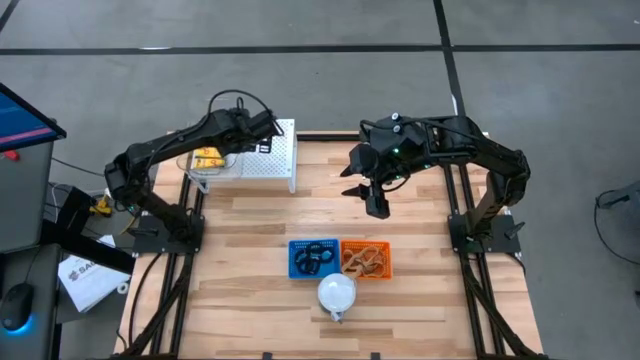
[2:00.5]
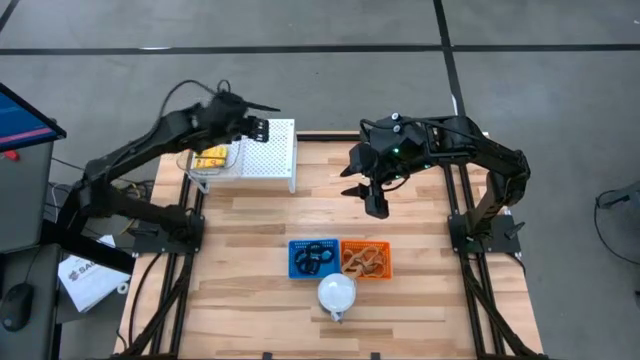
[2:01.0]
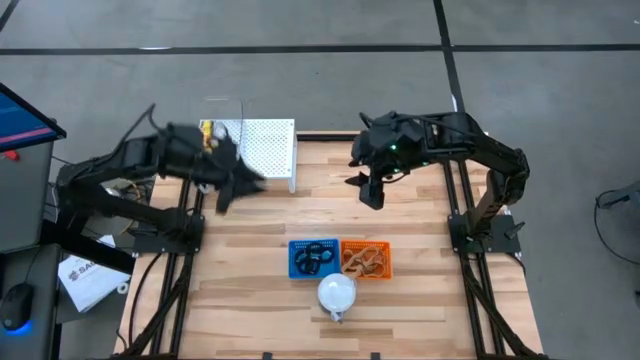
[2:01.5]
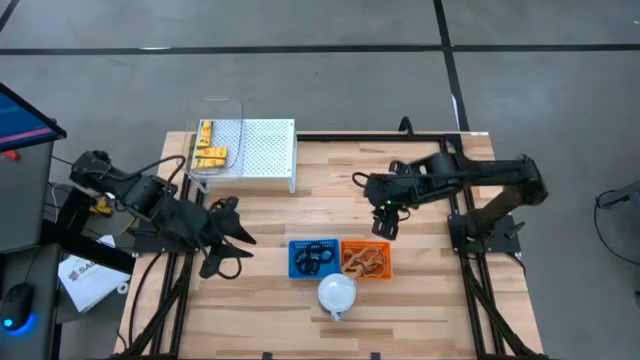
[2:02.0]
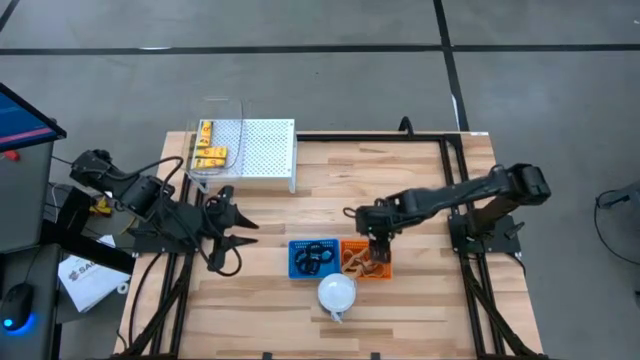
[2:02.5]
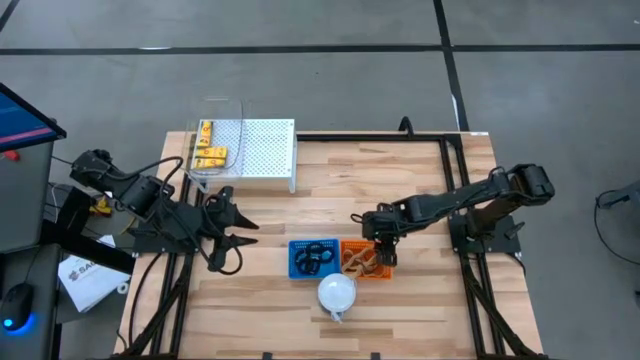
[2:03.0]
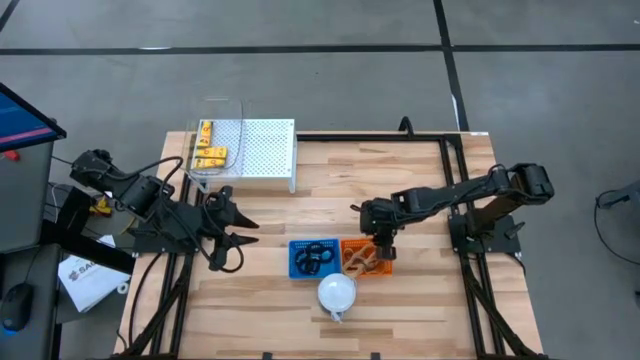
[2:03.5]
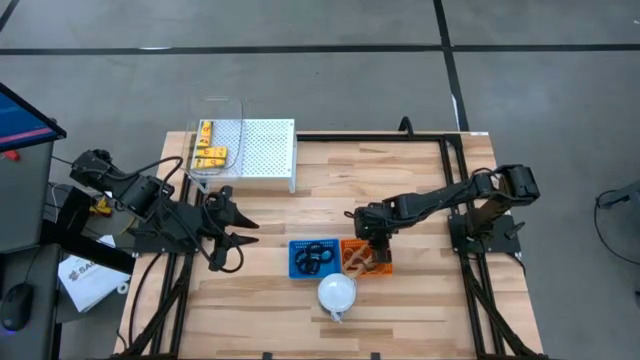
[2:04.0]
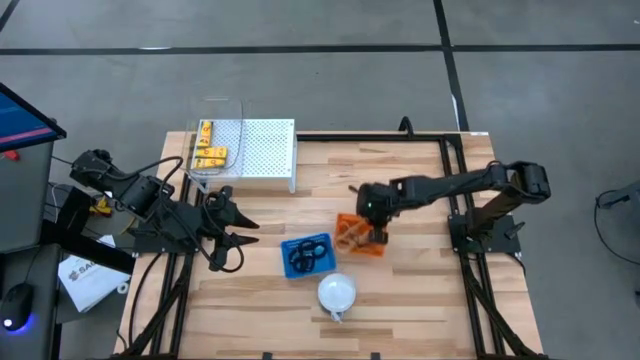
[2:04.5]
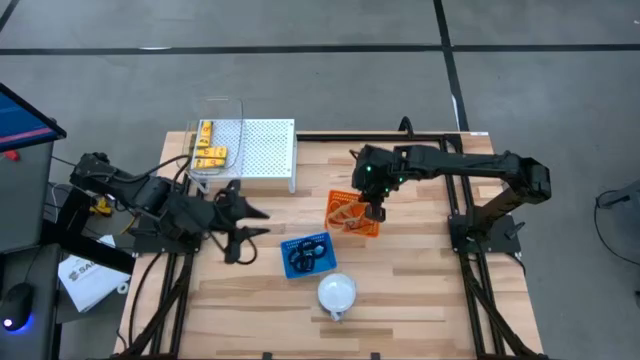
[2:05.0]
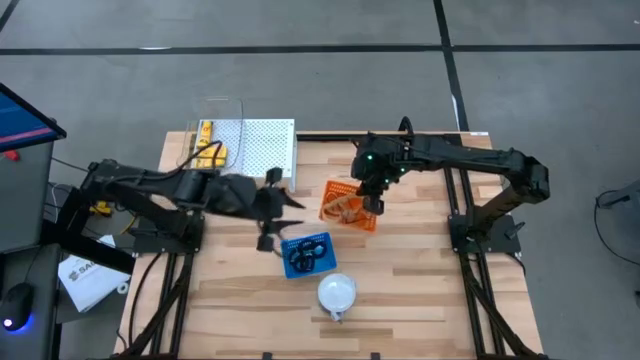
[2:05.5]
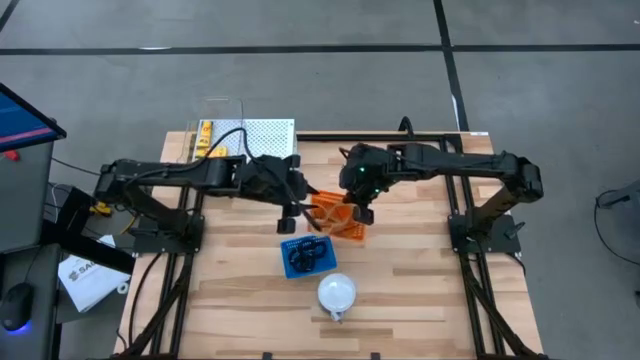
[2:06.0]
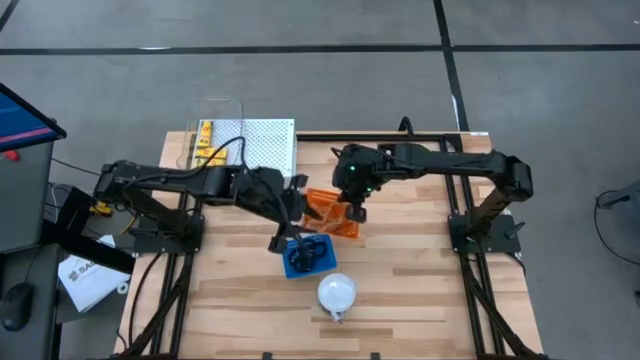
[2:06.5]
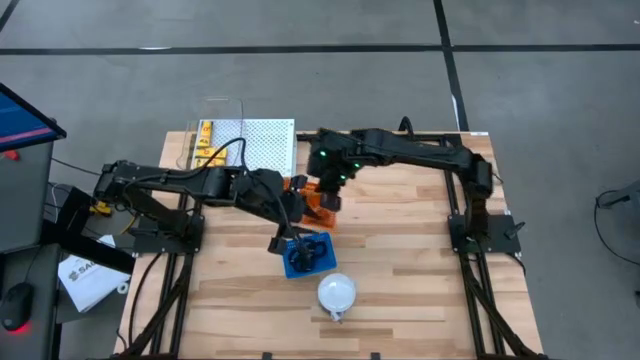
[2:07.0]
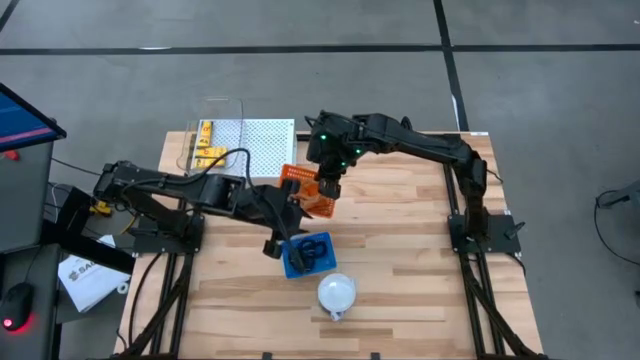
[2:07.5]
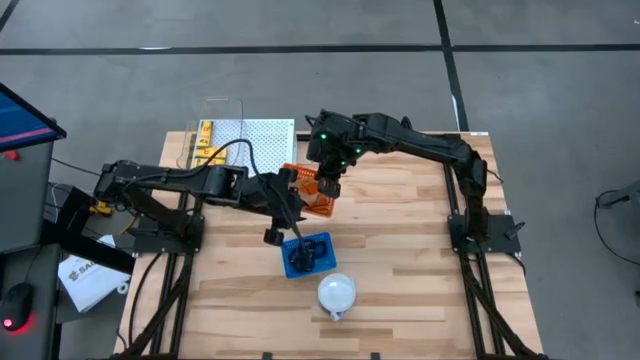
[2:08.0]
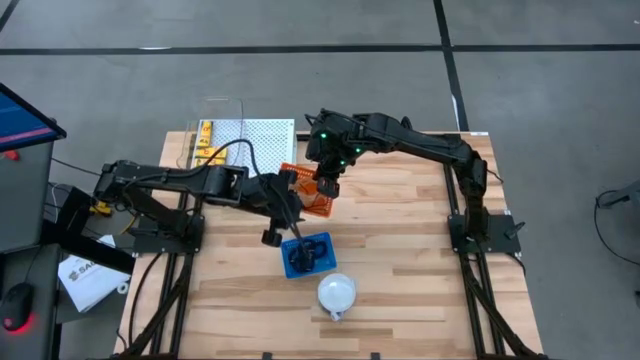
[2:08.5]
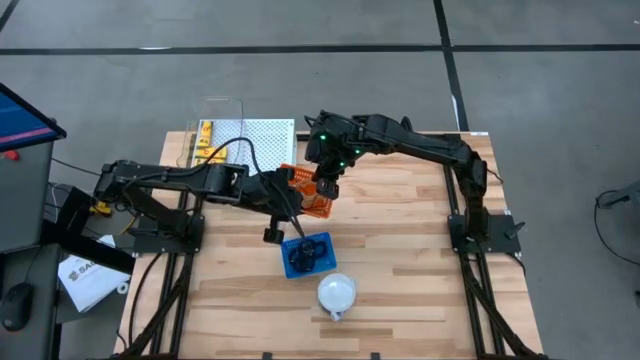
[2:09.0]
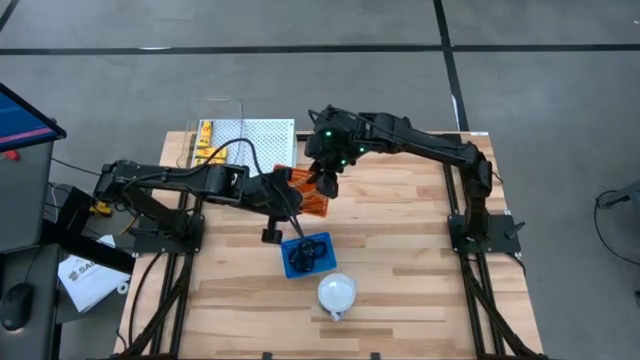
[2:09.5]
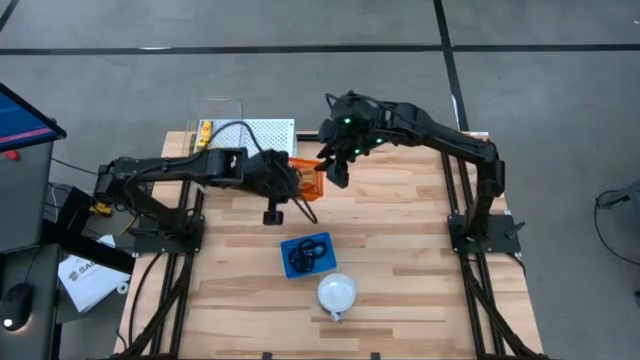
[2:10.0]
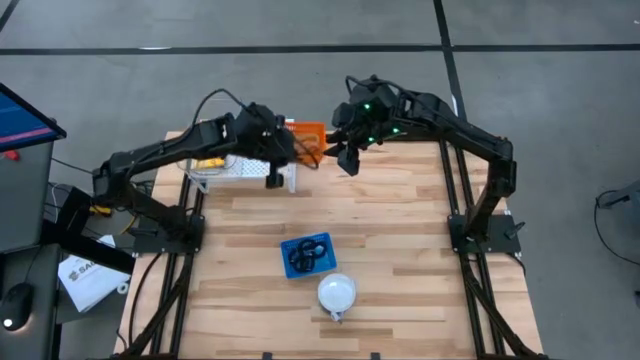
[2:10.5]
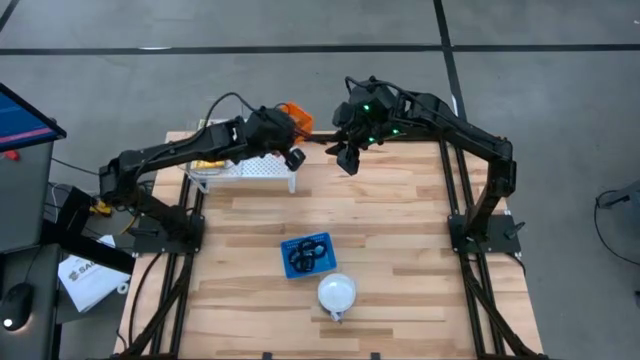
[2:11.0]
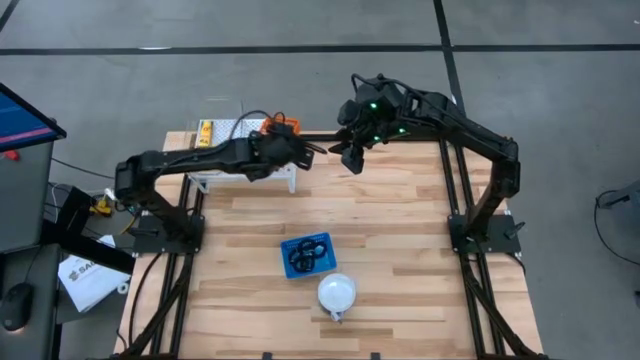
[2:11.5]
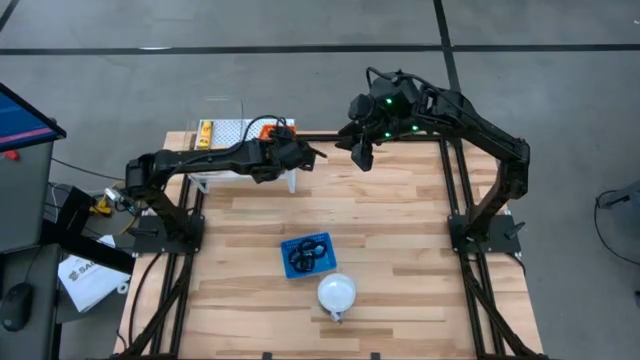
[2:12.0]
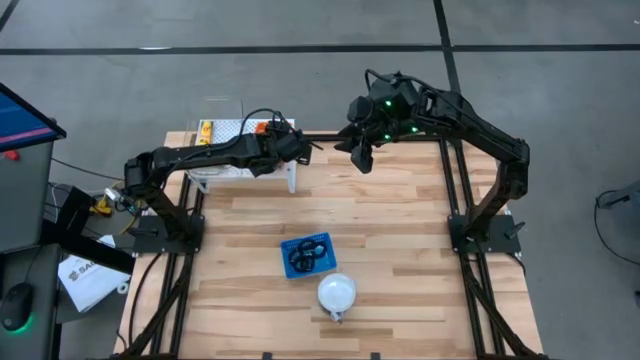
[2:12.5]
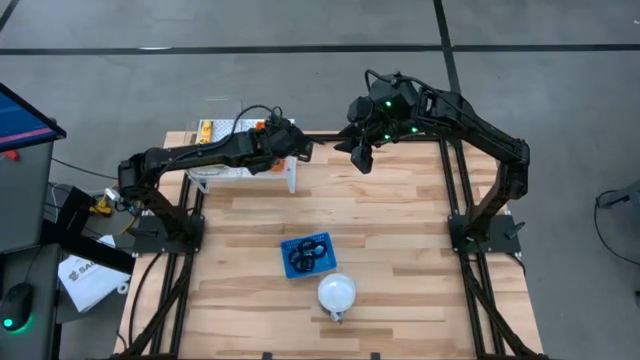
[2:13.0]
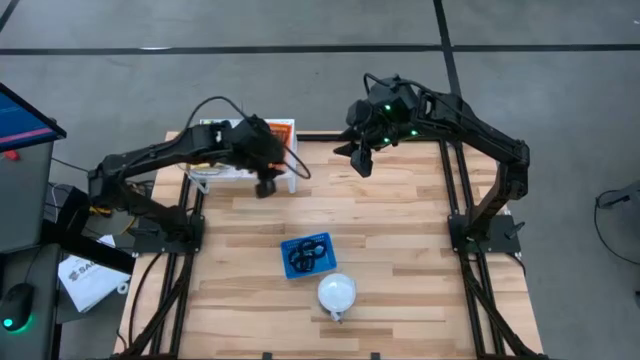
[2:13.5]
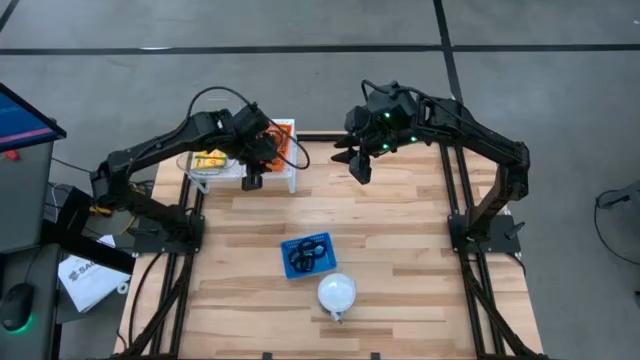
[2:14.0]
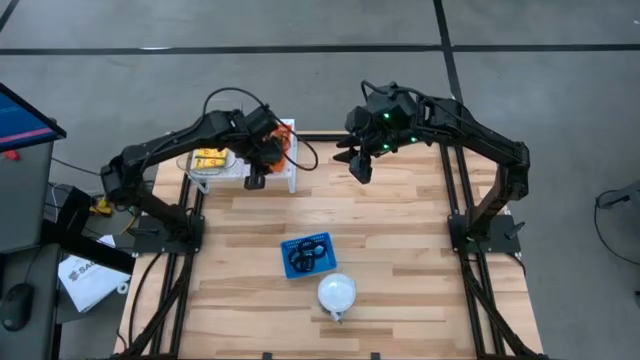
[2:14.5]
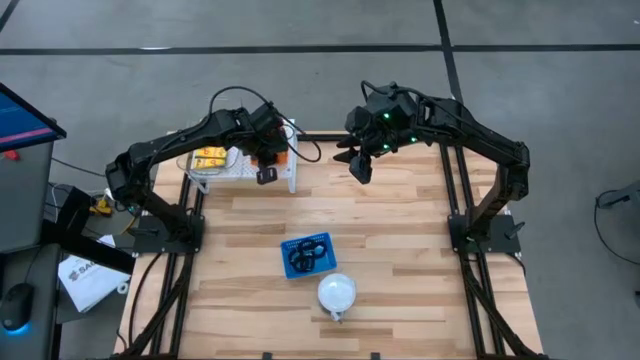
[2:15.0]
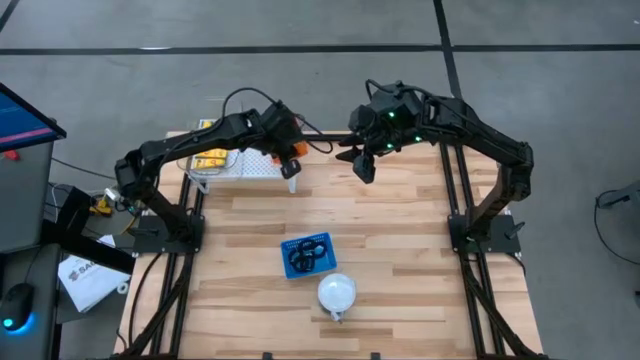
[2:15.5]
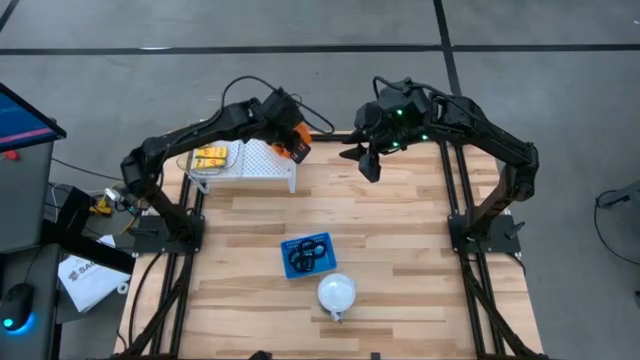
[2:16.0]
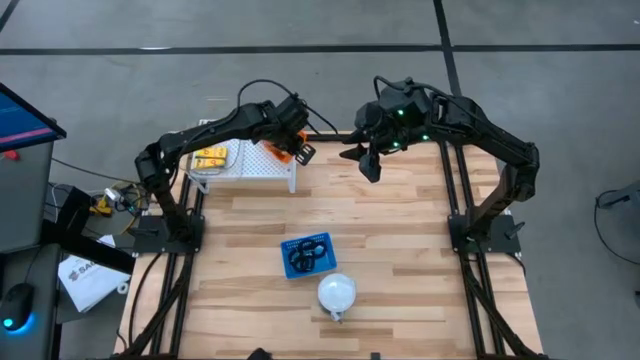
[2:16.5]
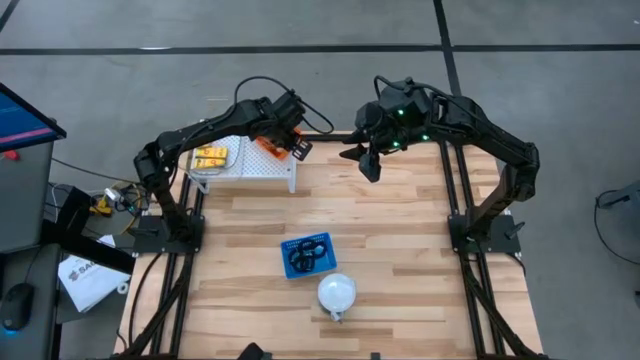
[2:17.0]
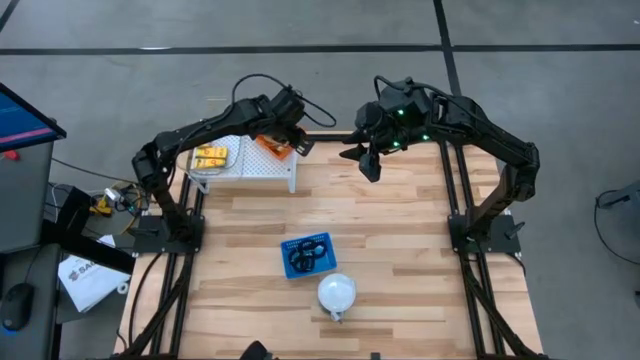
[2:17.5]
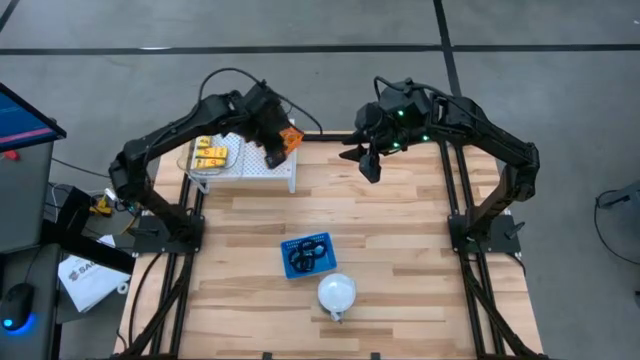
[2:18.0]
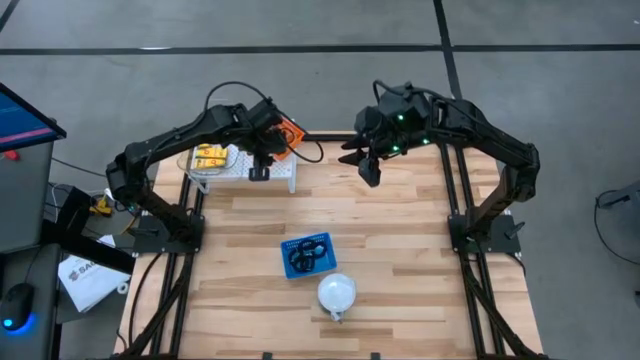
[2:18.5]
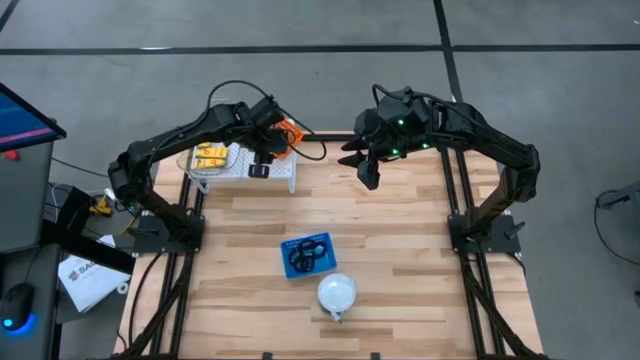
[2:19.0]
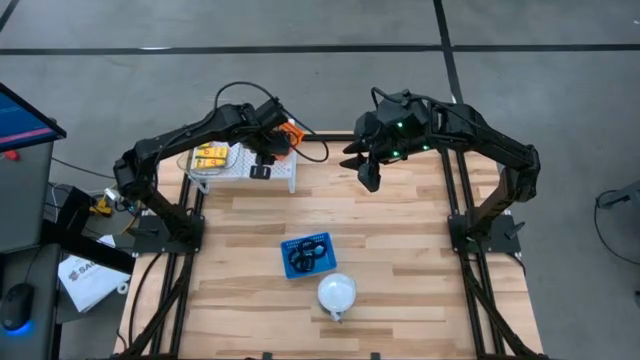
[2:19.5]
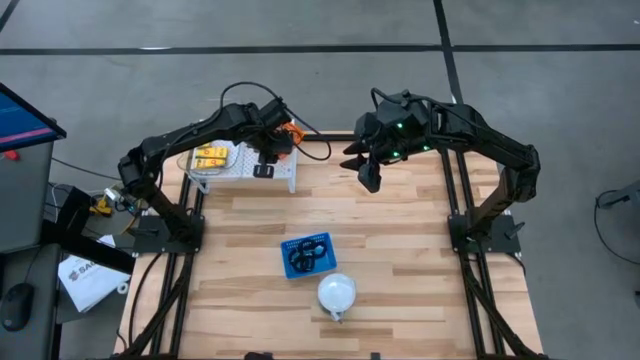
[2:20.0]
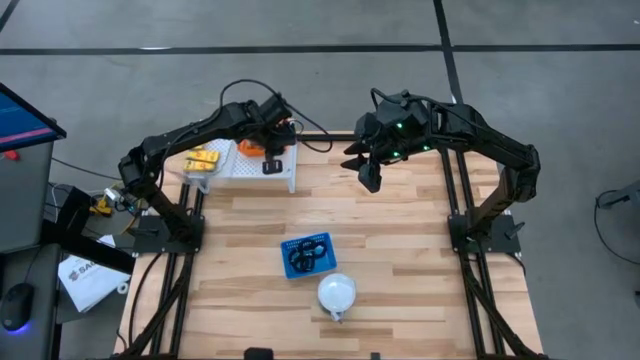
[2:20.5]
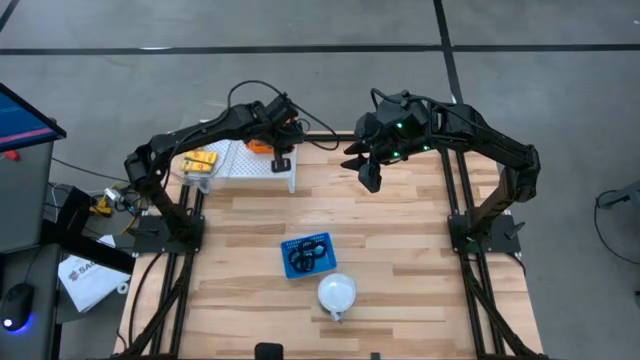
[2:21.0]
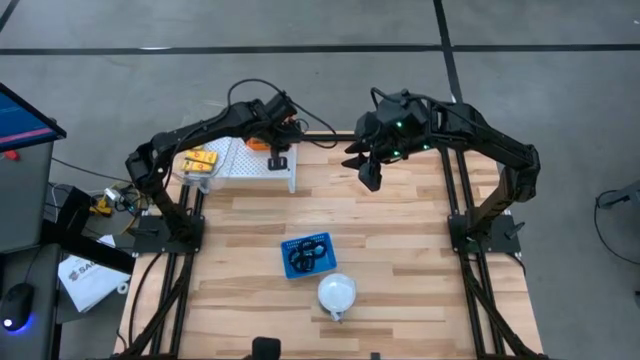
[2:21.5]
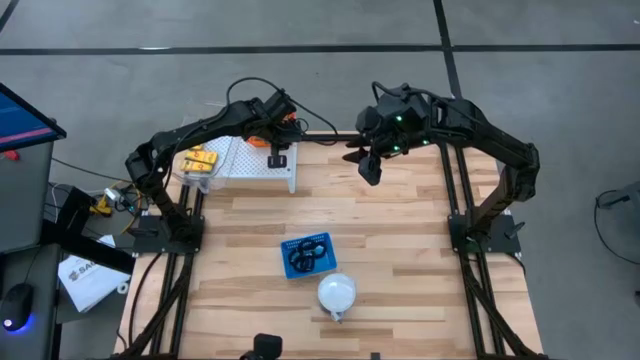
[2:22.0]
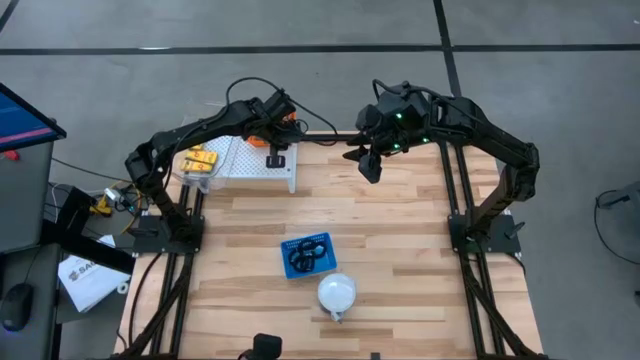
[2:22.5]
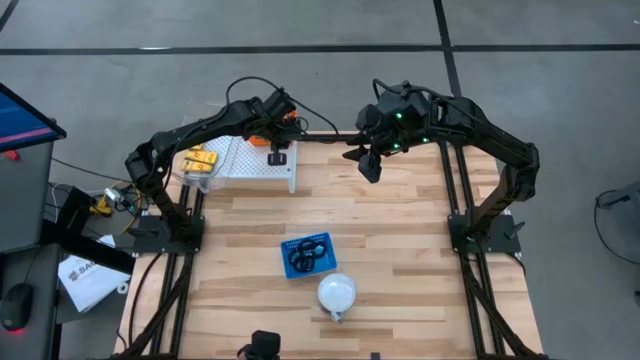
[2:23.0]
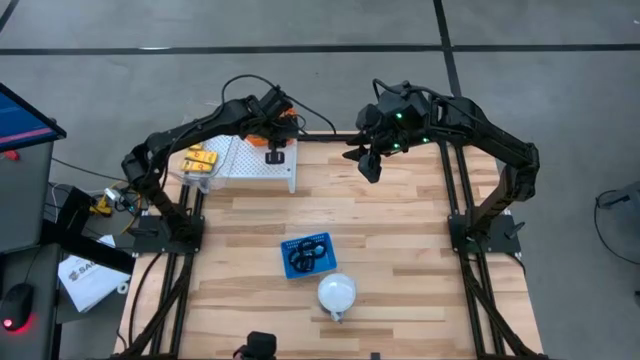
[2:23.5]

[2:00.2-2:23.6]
Task: Pick & Place Office Desk Supplies
Put the orange basket filled with rubber bands on the shelf
